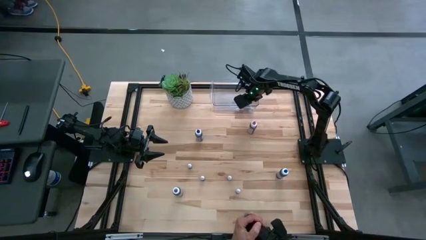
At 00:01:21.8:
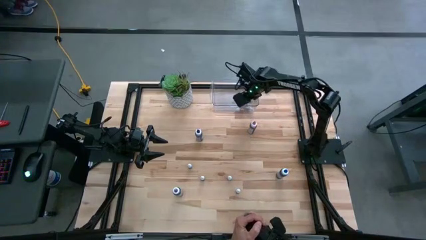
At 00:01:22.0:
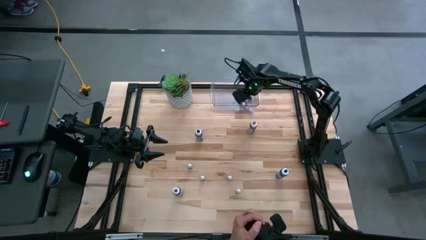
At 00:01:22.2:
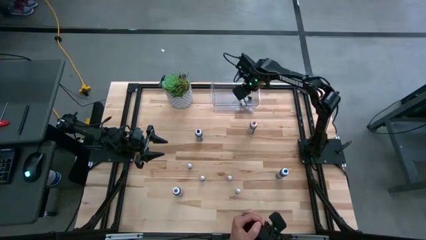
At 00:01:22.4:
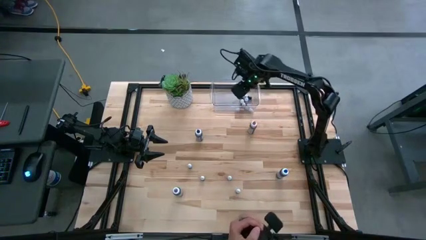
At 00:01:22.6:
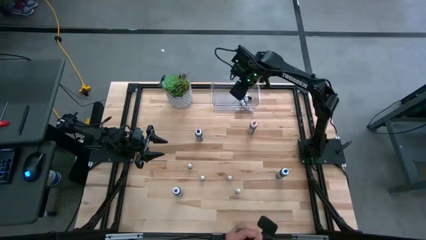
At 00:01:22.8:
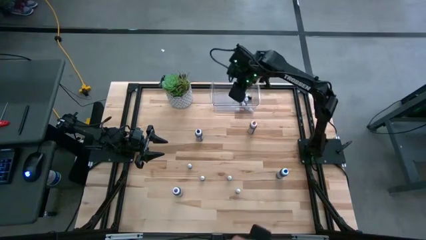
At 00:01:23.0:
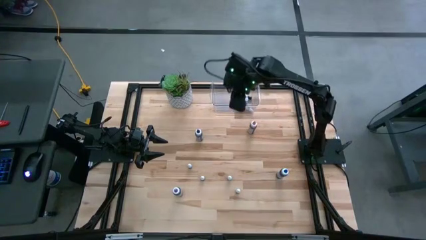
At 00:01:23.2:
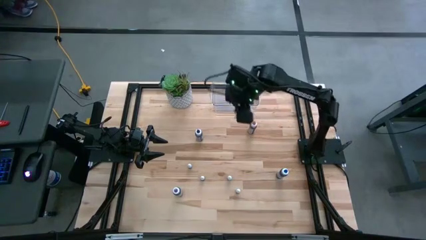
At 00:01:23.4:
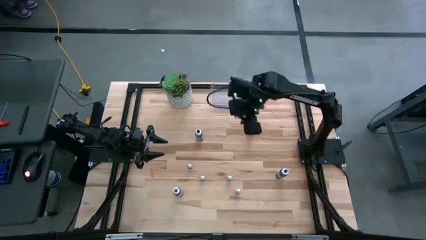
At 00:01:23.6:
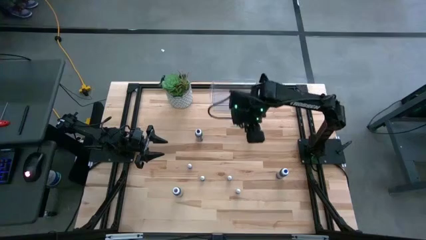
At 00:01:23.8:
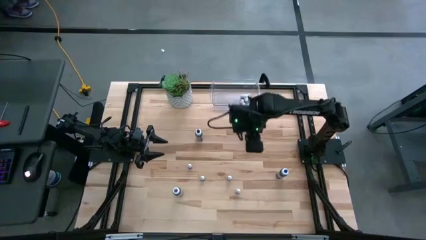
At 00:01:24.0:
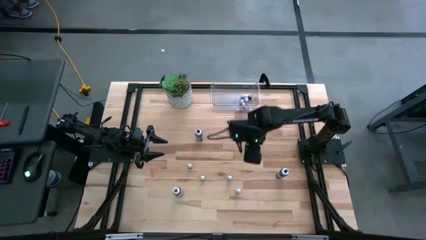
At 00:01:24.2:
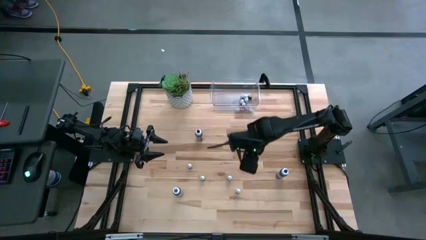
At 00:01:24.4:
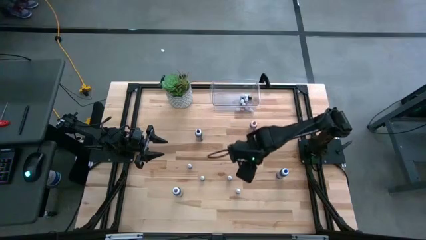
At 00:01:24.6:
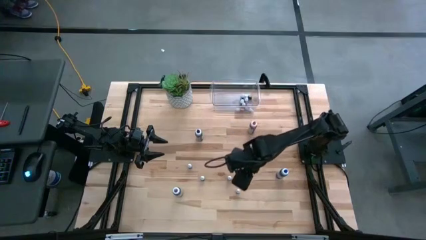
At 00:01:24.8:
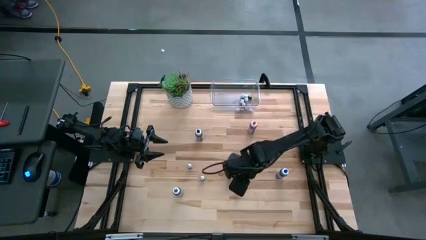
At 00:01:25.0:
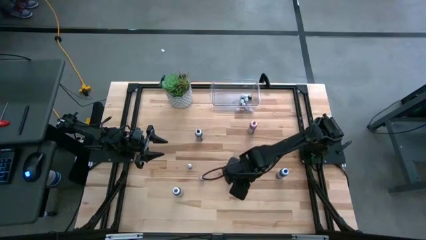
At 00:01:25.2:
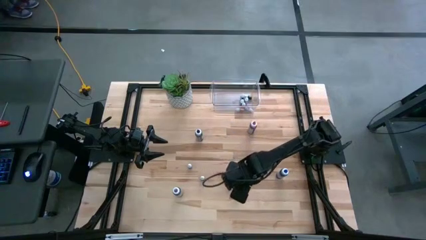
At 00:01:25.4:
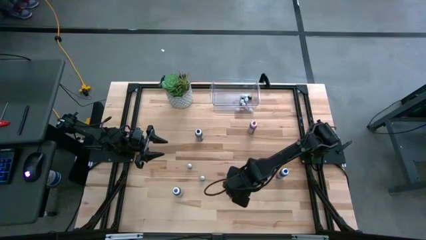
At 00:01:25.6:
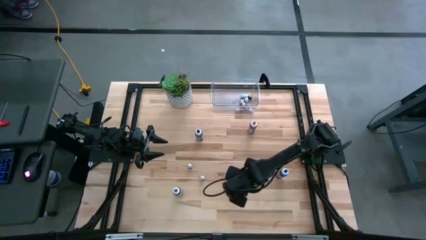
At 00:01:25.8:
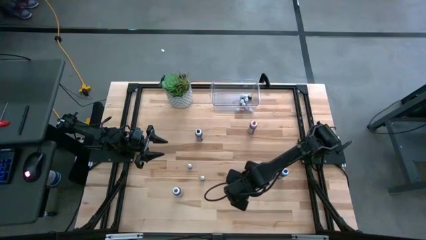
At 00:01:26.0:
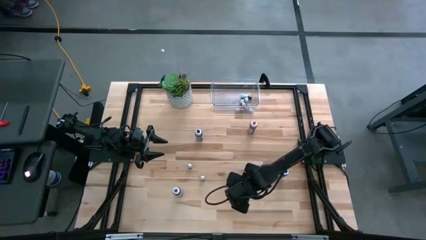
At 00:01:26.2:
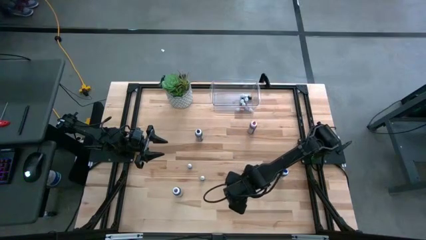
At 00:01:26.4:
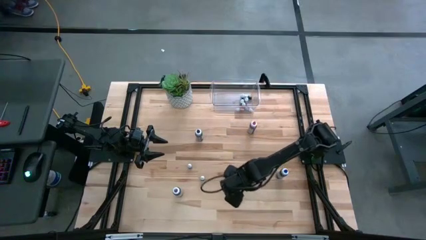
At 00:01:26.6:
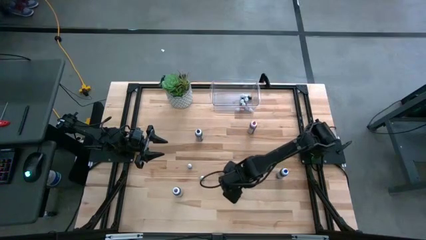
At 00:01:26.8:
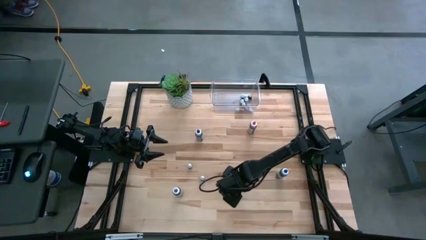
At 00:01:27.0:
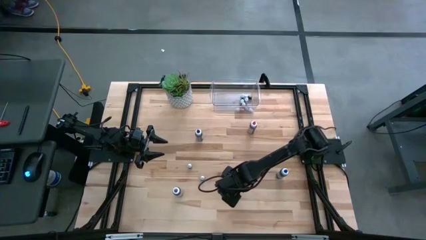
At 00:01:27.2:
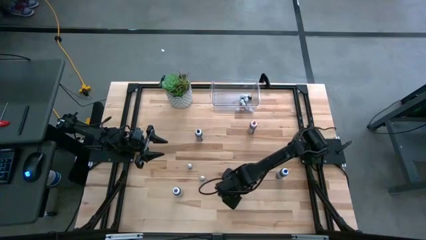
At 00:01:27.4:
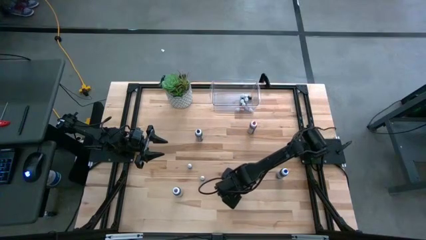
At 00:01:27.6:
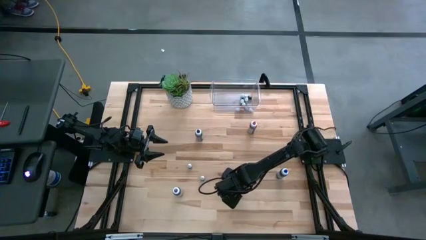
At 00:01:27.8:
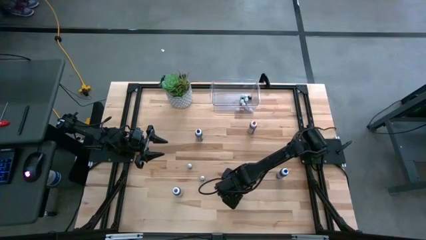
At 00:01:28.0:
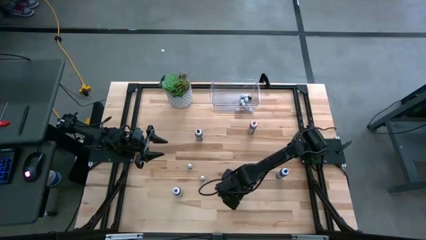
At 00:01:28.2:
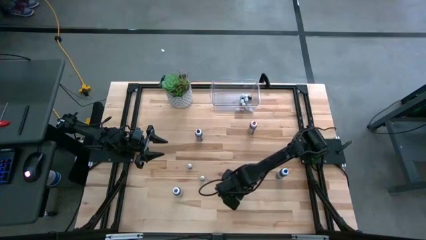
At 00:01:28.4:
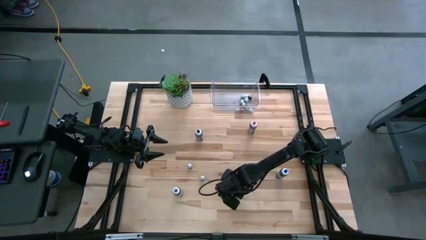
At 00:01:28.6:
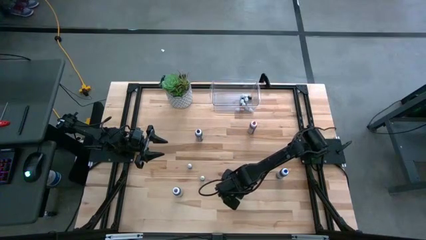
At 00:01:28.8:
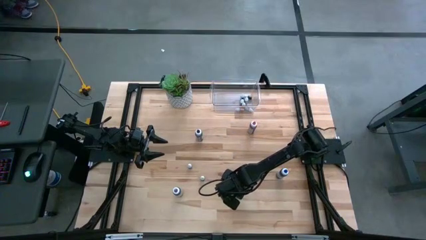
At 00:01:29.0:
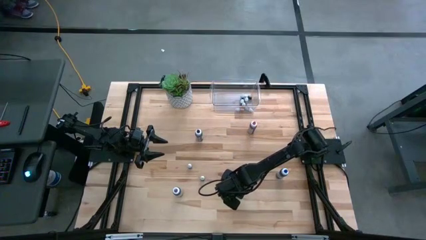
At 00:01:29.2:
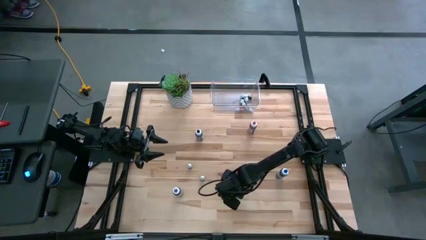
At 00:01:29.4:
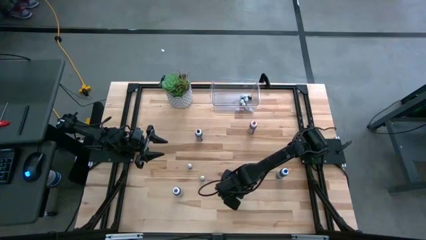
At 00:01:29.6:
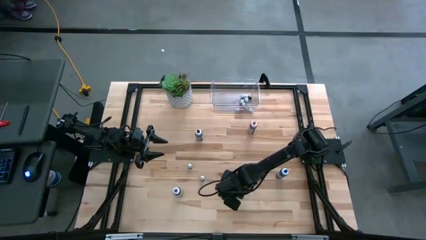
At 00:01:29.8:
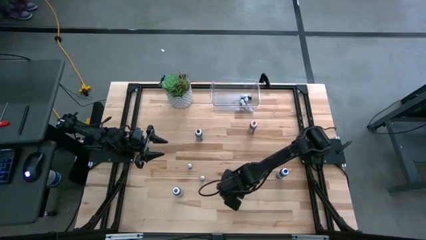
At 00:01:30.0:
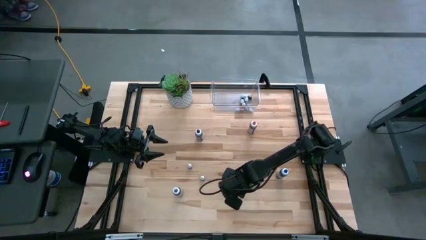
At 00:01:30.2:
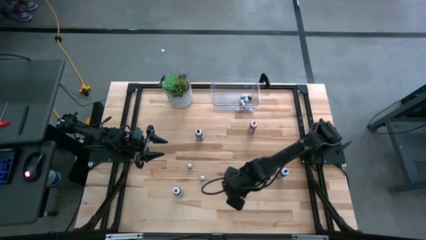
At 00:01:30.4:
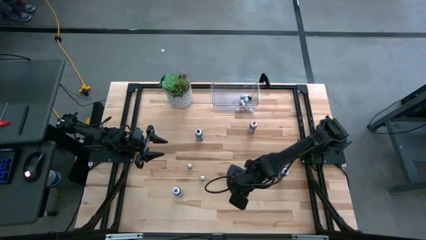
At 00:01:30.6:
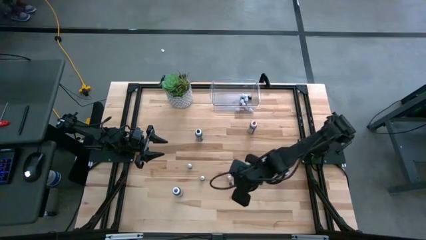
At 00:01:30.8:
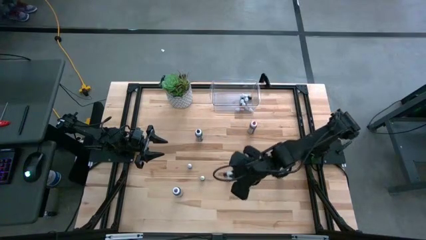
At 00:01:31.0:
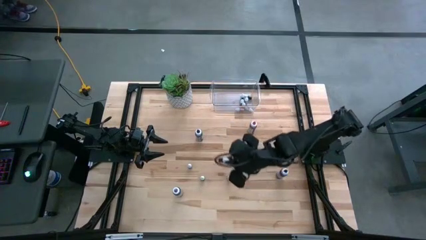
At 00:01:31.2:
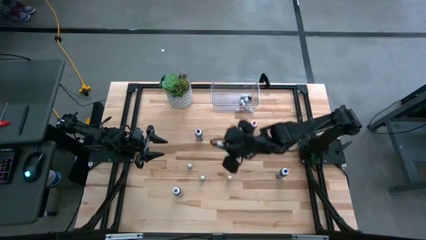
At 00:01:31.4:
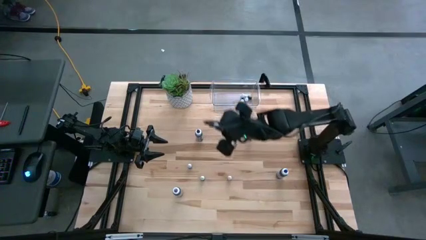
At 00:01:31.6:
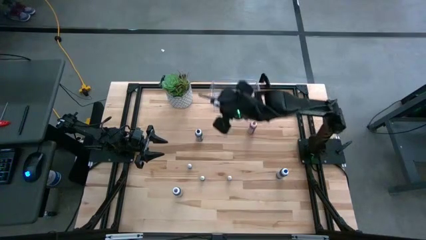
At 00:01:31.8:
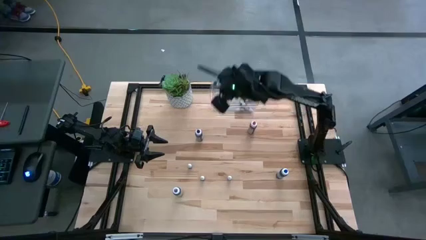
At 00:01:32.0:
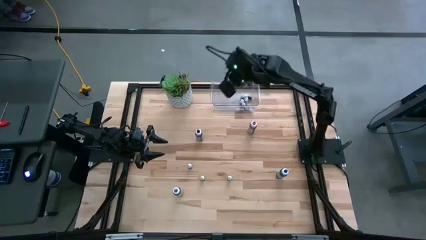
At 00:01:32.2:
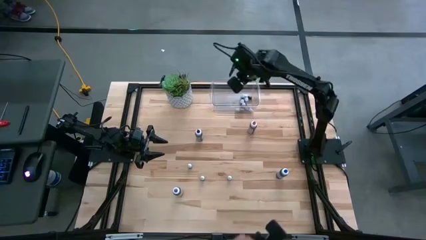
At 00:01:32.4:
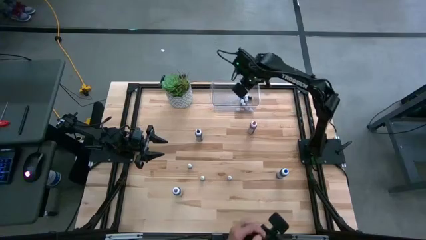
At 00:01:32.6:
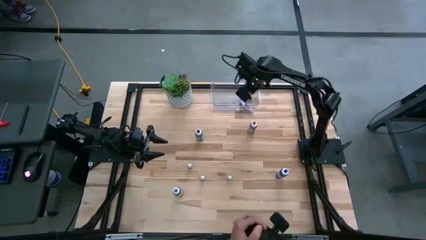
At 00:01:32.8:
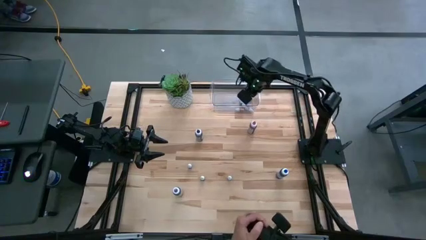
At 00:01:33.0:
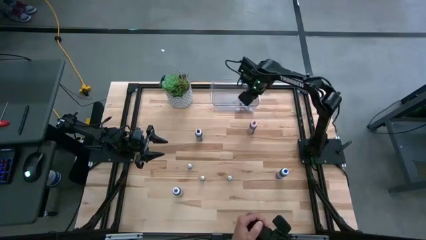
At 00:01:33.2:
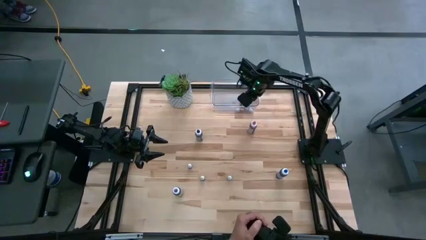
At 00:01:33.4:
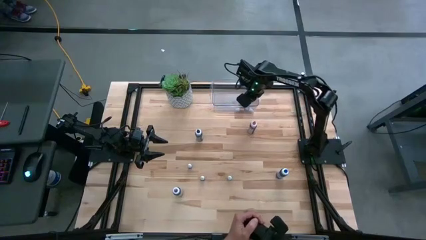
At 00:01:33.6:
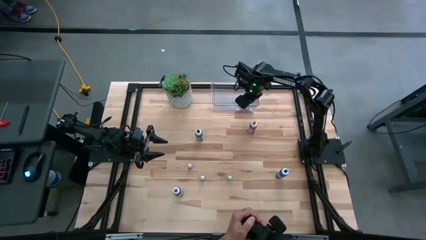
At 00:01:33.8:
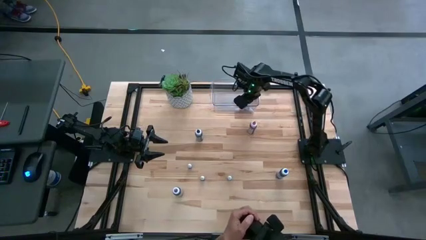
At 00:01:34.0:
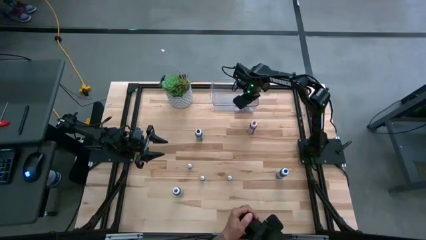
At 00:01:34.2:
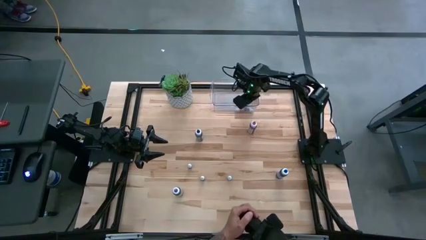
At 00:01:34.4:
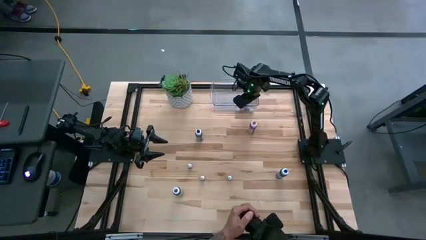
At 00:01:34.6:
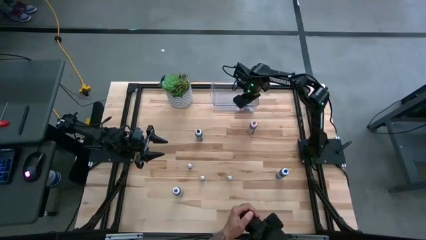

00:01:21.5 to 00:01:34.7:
Task: Pick & Place food coloring
Put the small purple food coloring bottle into the bin
